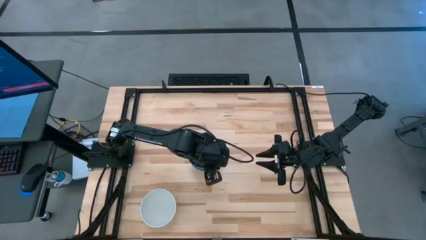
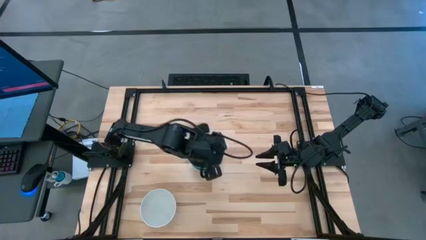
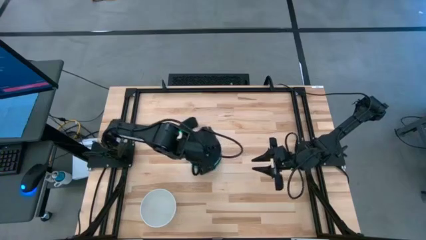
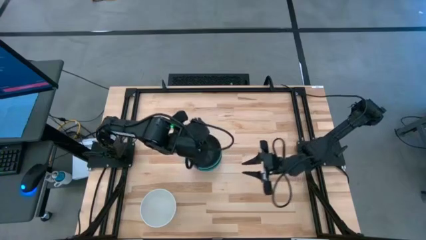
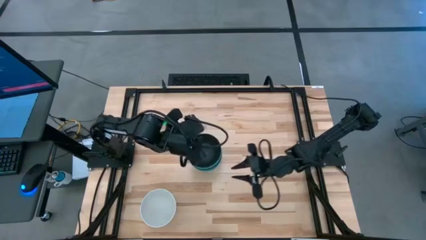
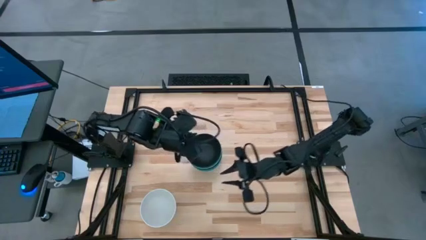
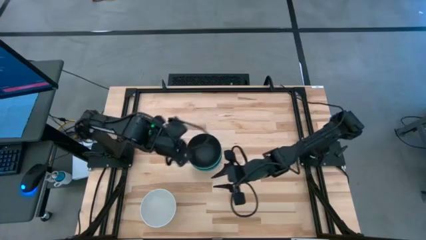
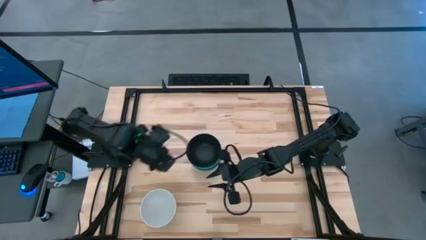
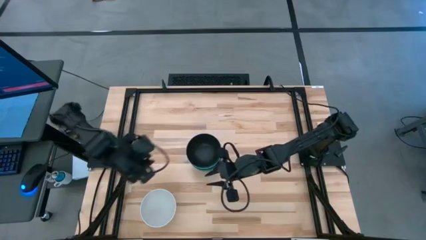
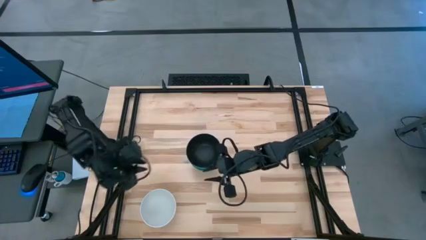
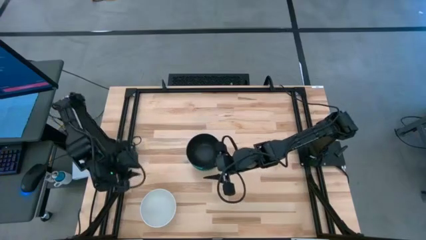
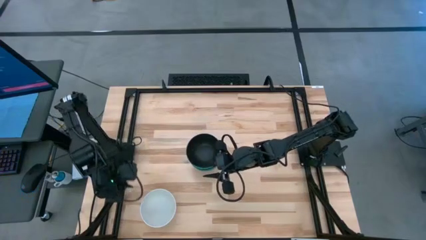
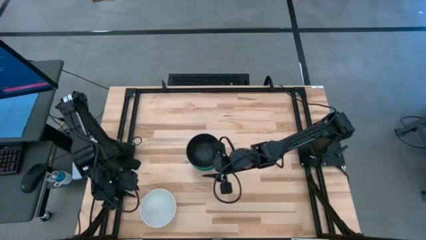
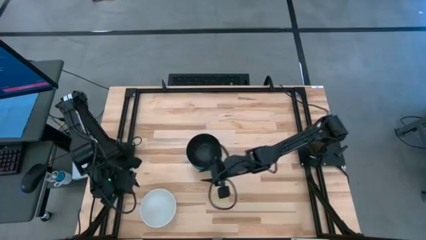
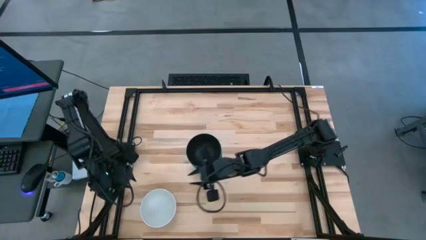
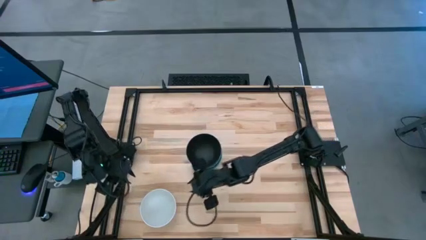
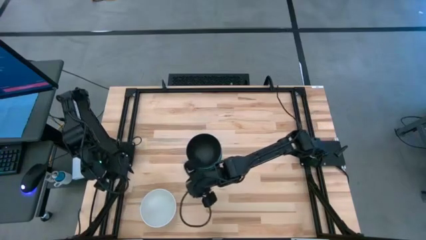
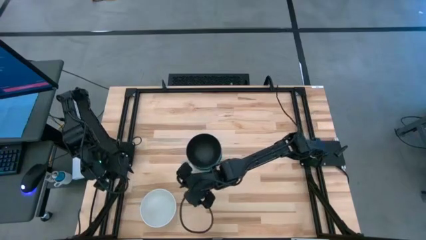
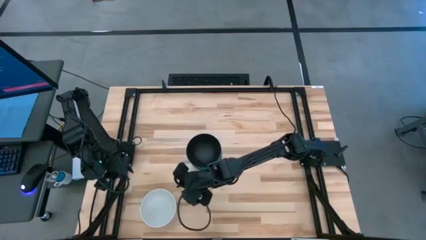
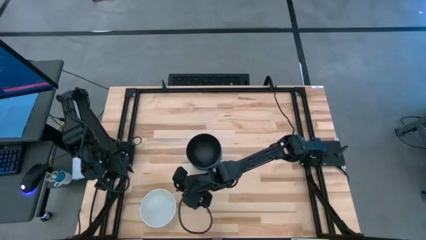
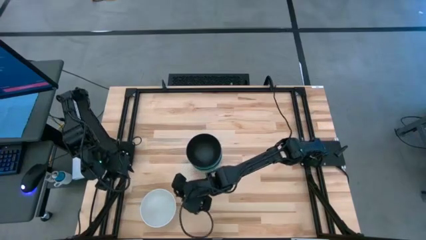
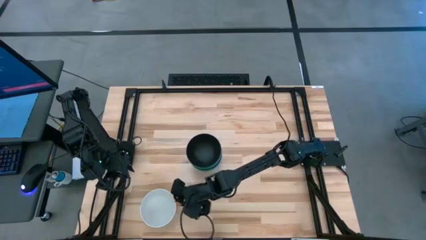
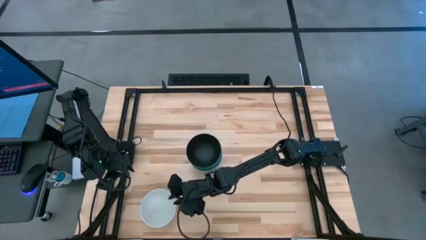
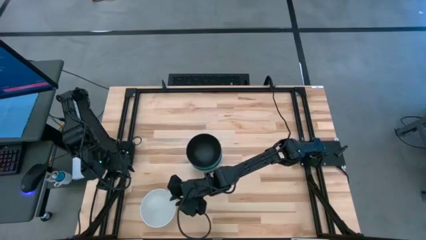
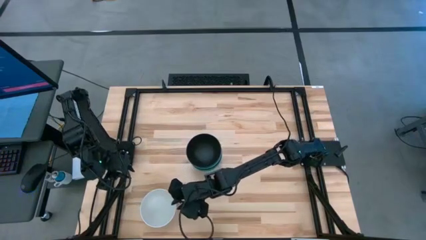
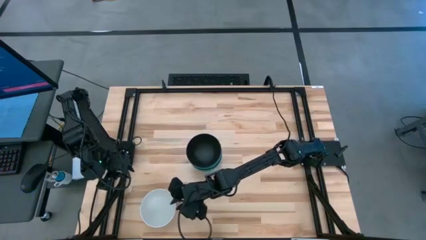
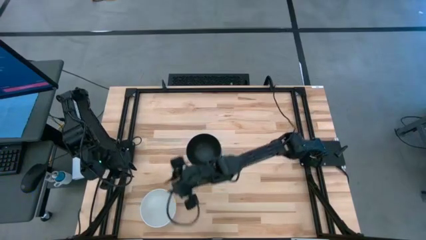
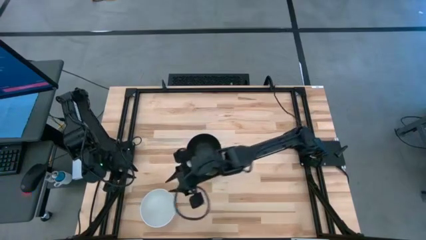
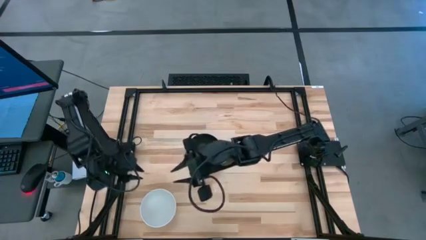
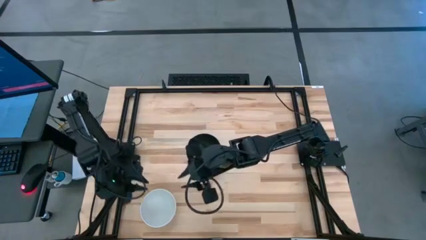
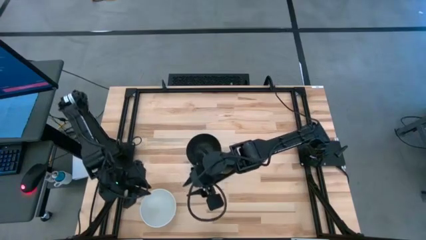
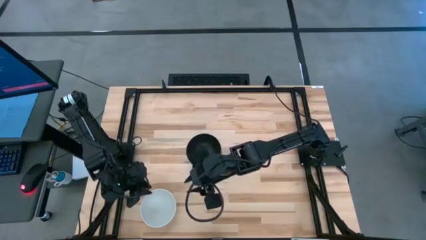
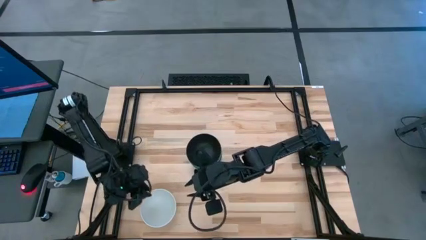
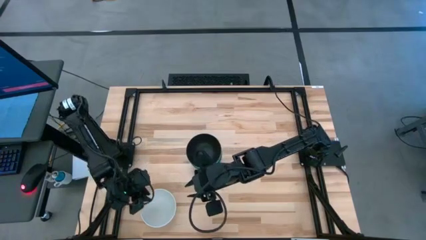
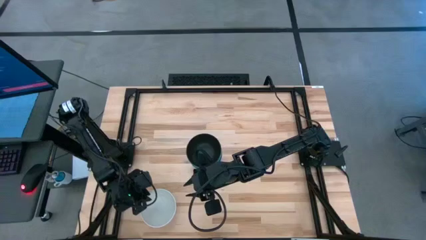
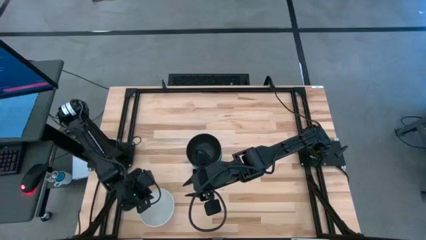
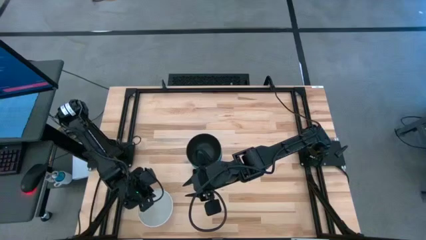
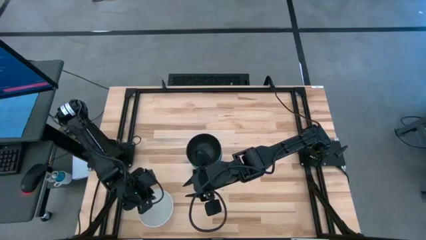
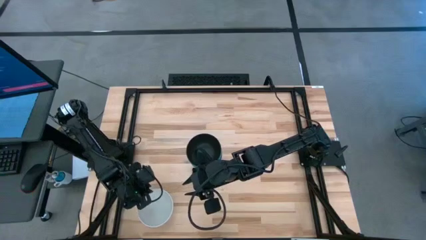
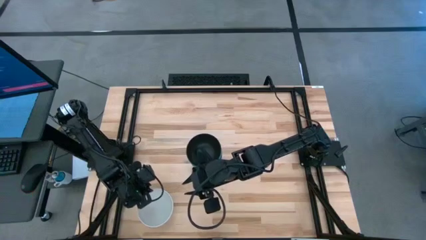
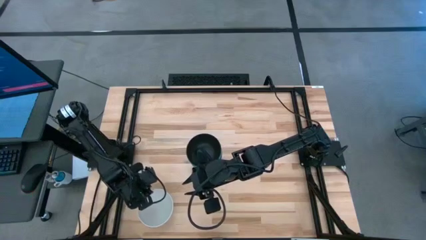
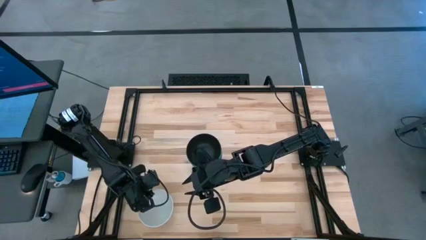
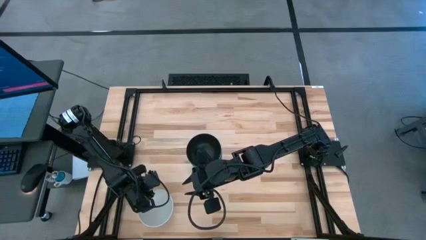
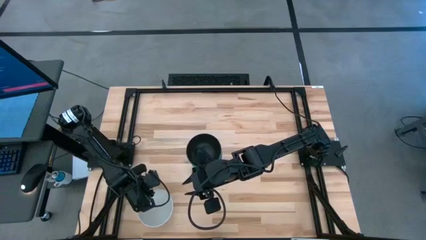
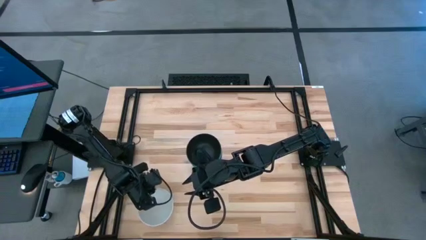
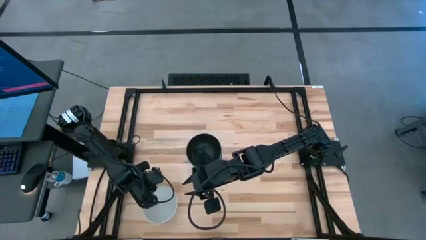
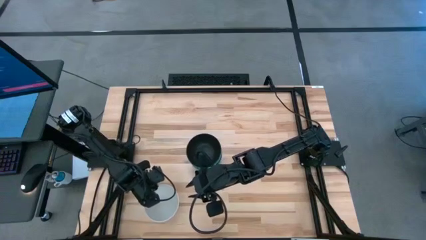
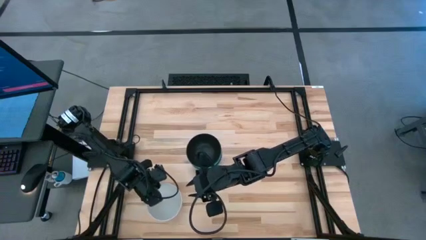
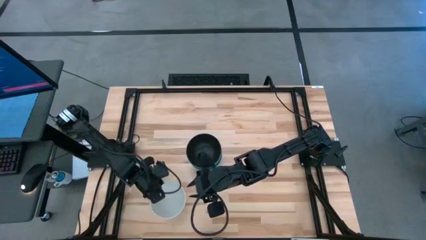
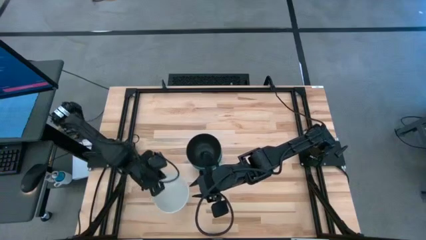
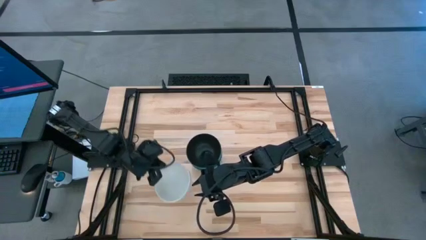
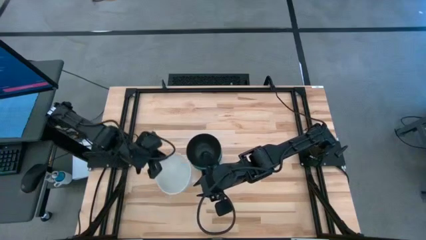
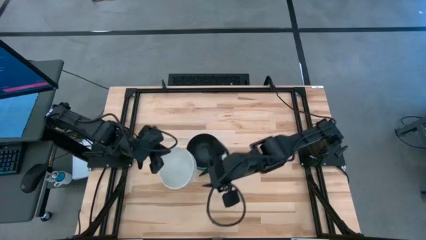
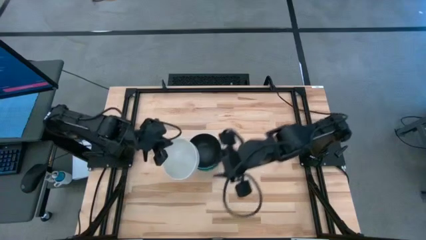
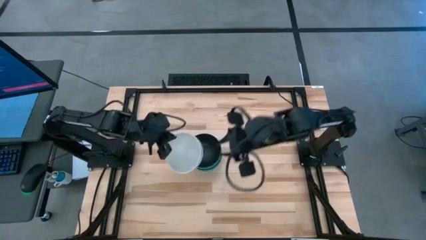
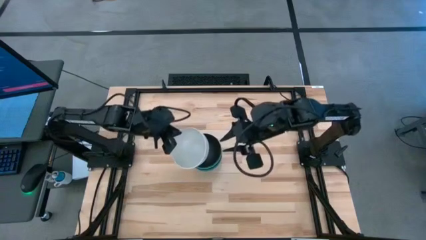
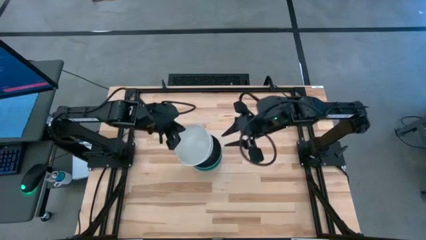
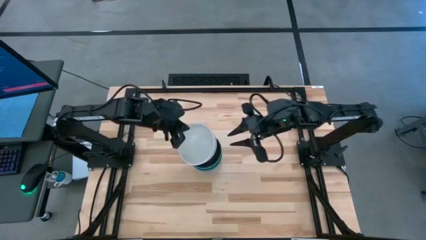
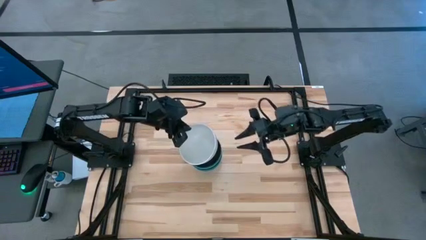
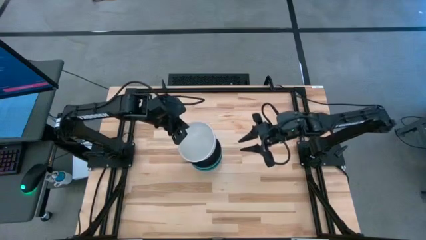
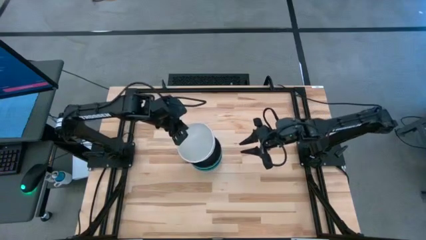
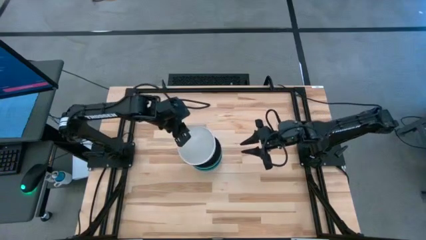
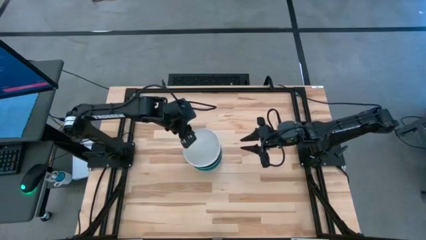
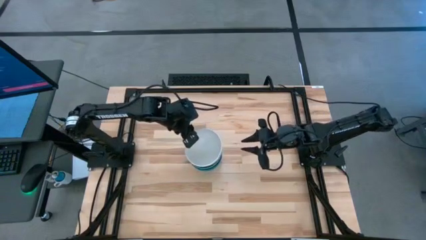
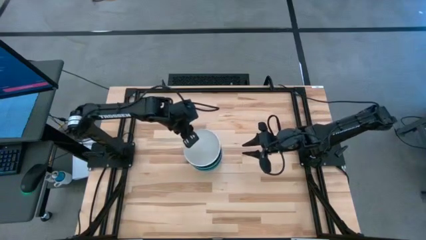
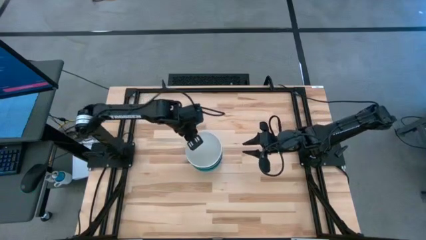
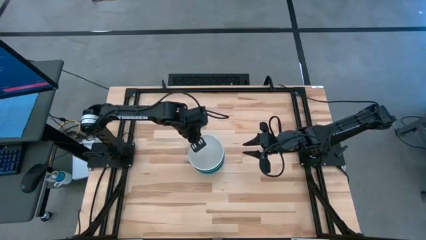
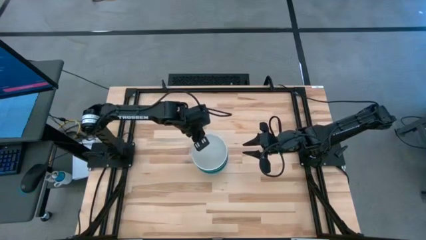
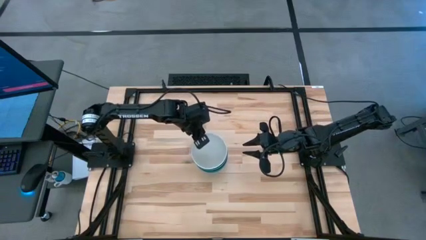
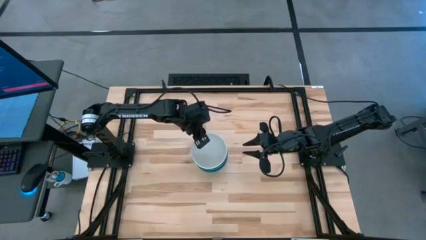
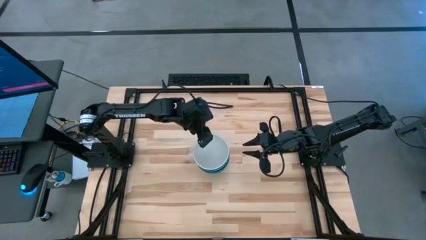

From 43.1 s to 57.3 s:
Task: Nest bowls inside each other
Stack the white bowl on top of the black bowl

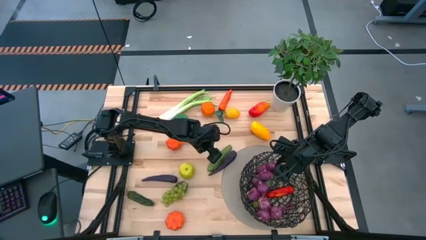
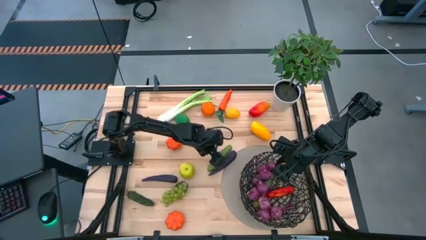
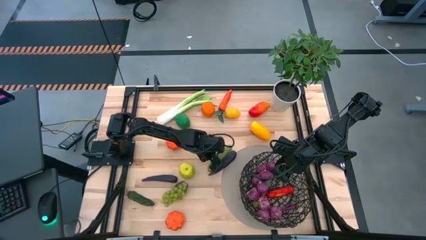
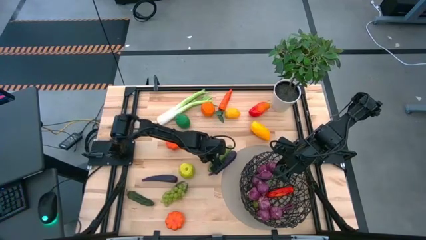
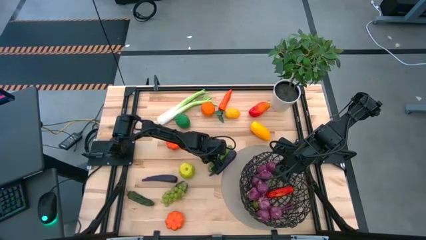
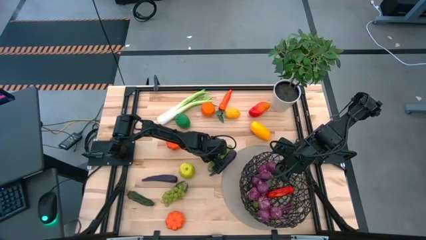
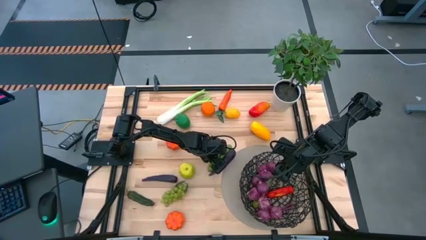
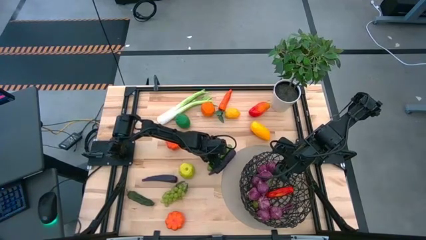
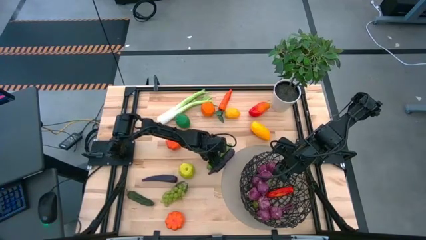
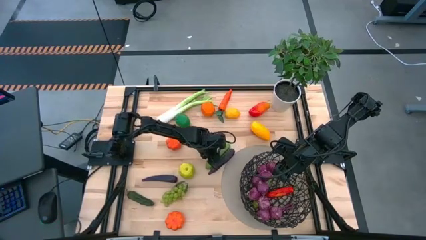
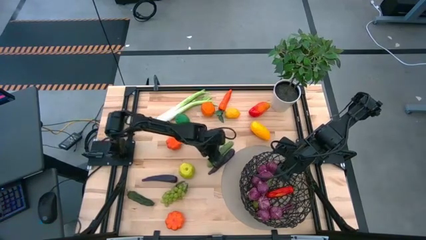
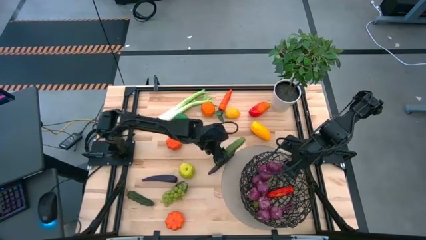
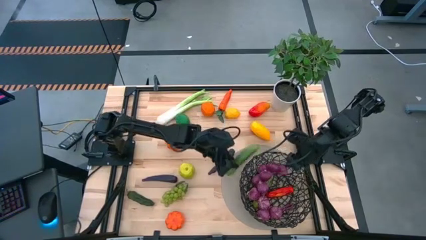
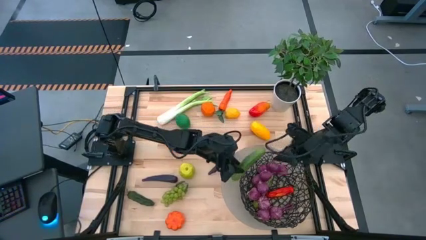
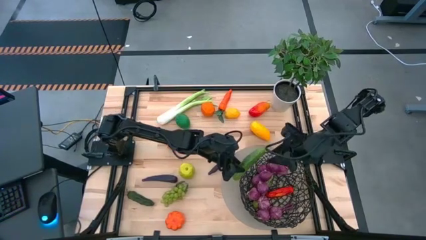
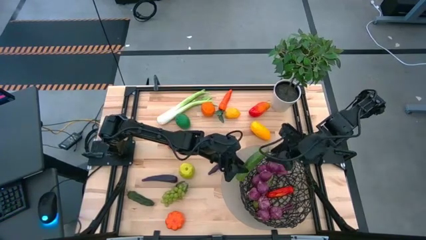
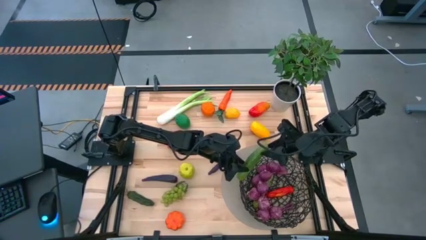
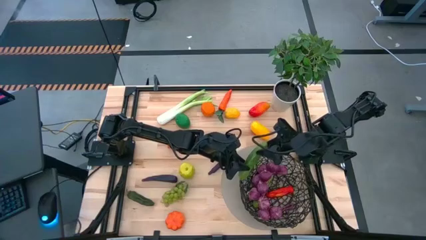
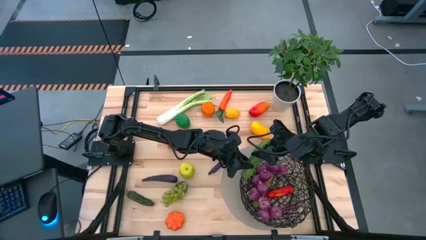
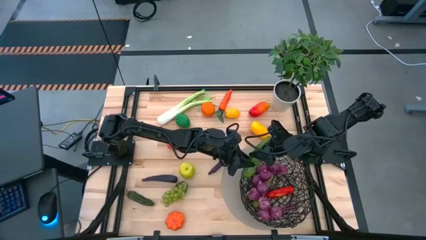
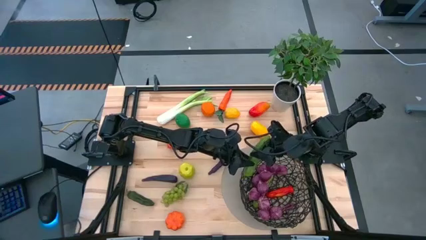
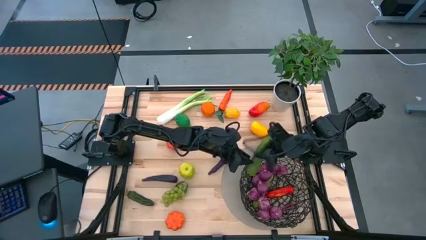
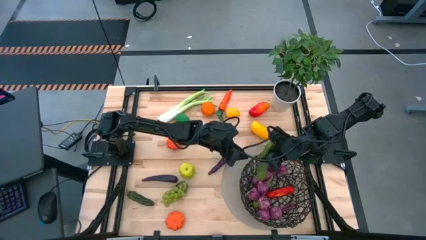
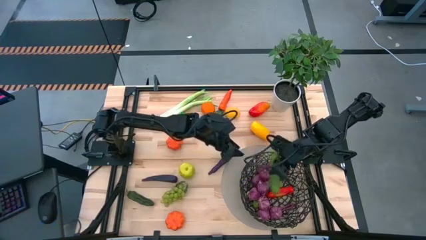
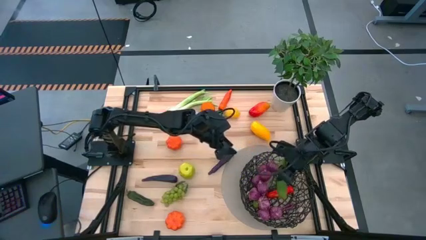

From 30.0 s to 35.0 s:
Task: Build produce basket
Put the green cucumber into the black basket
